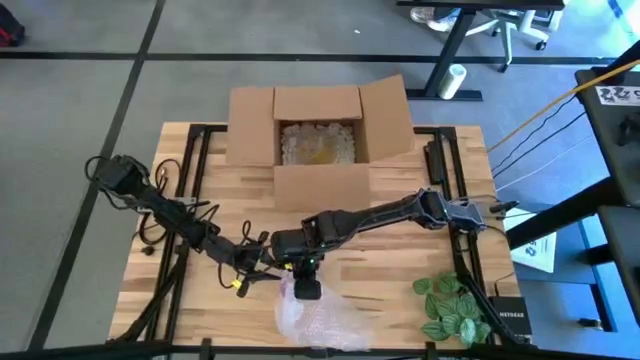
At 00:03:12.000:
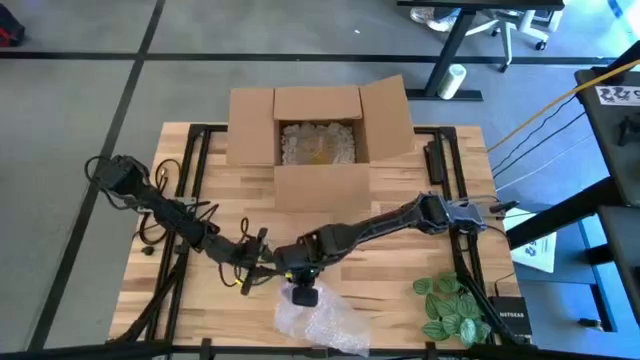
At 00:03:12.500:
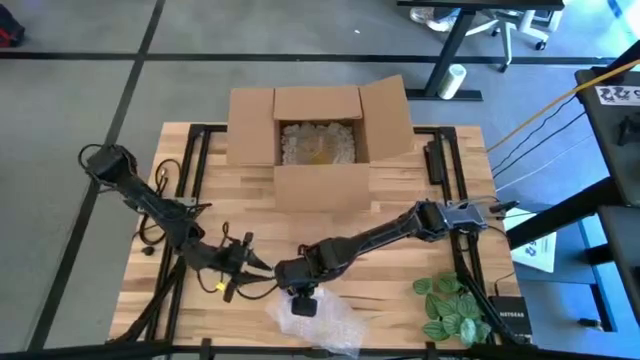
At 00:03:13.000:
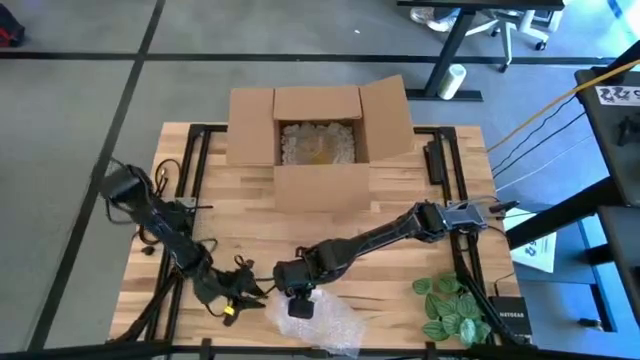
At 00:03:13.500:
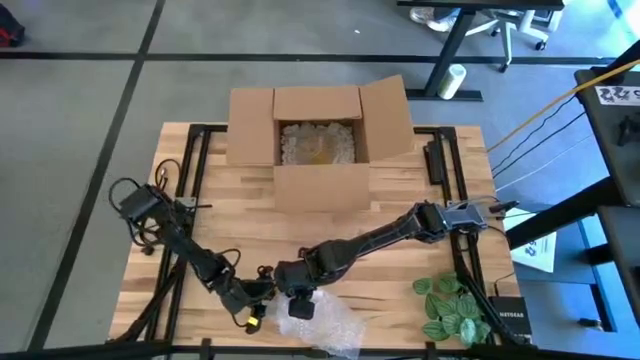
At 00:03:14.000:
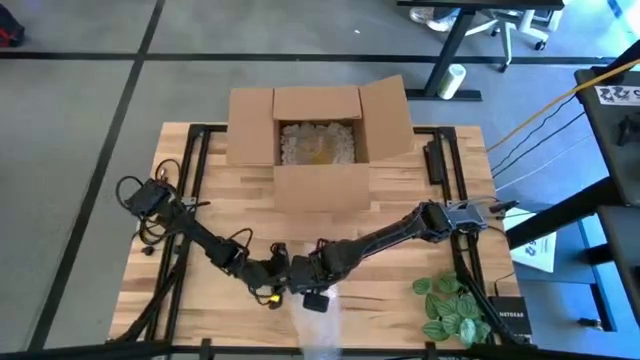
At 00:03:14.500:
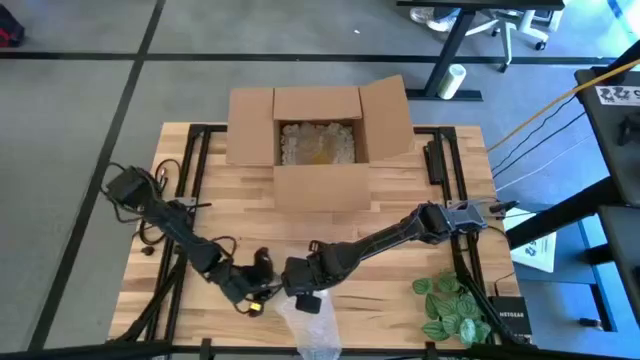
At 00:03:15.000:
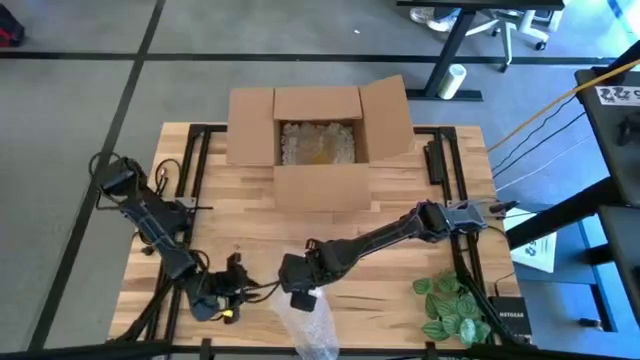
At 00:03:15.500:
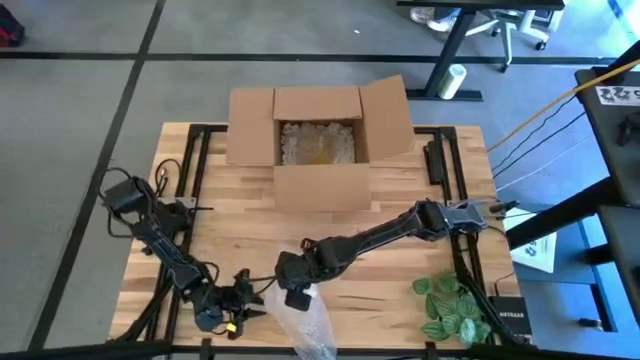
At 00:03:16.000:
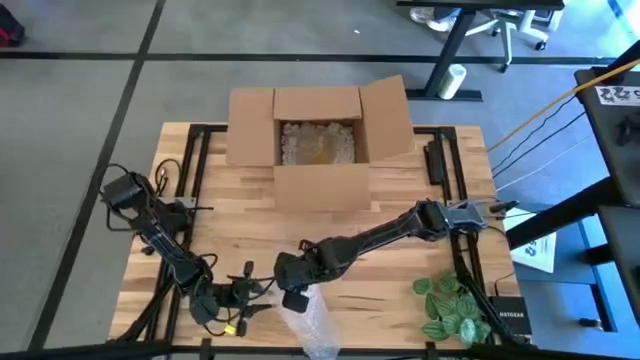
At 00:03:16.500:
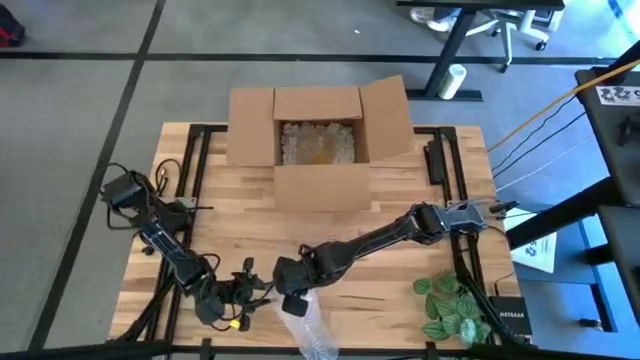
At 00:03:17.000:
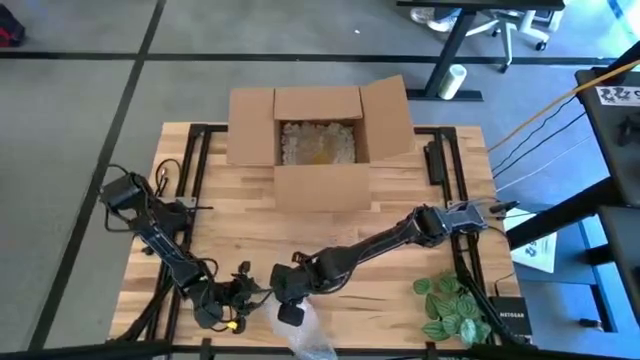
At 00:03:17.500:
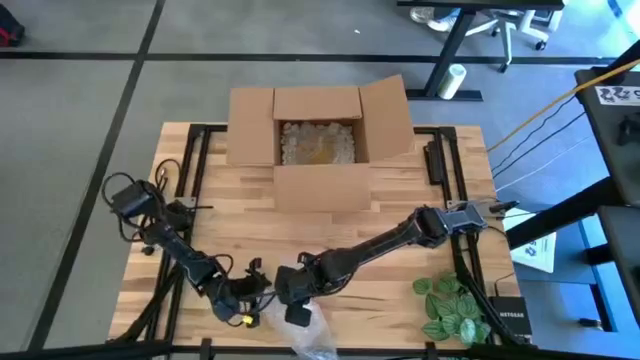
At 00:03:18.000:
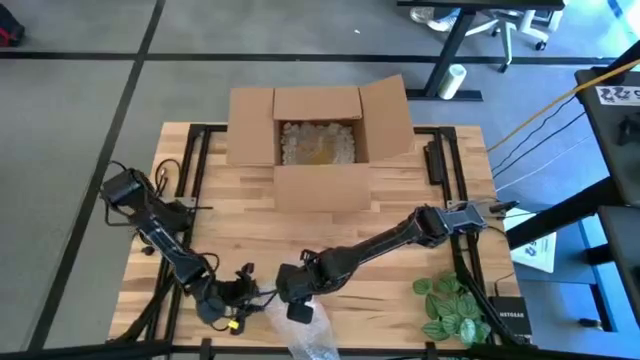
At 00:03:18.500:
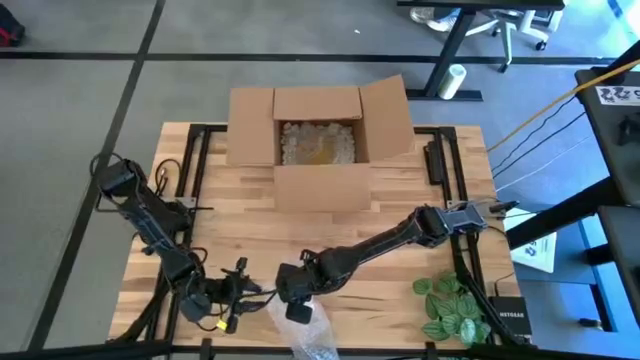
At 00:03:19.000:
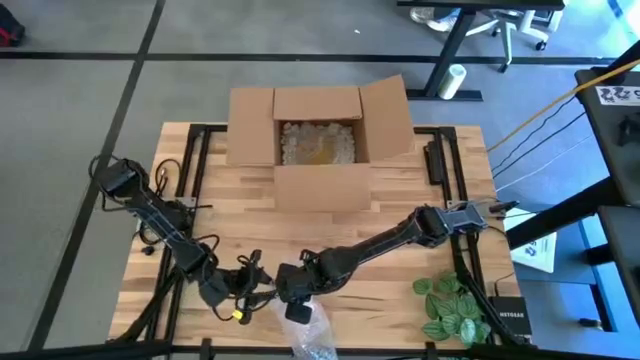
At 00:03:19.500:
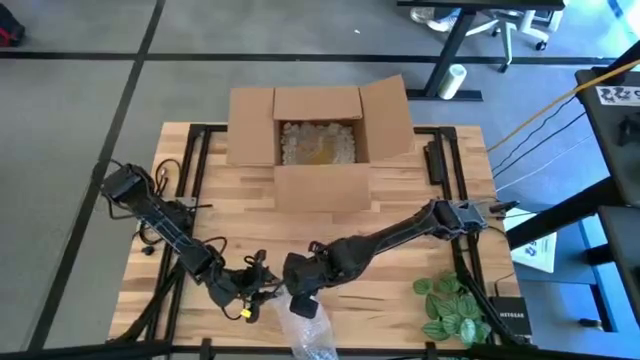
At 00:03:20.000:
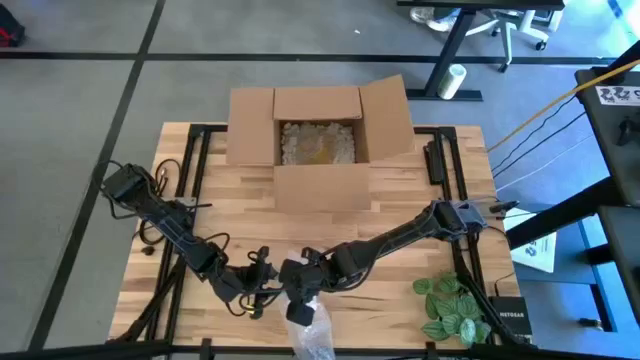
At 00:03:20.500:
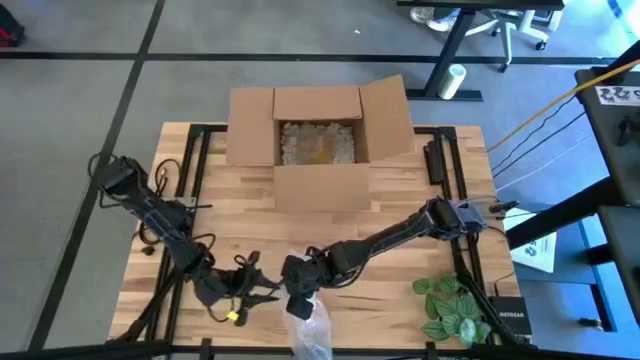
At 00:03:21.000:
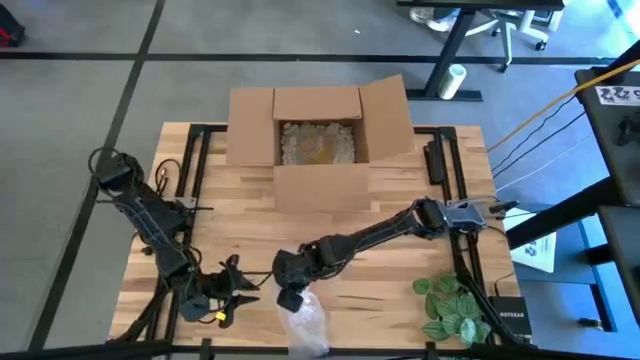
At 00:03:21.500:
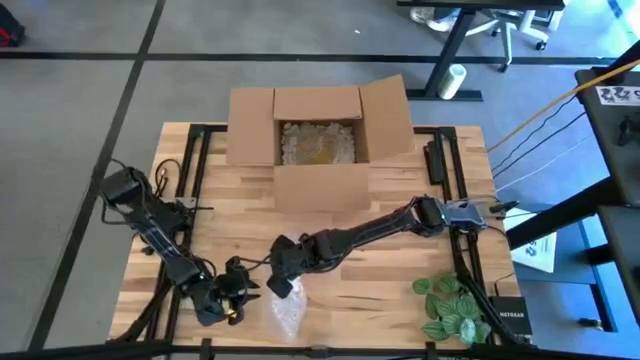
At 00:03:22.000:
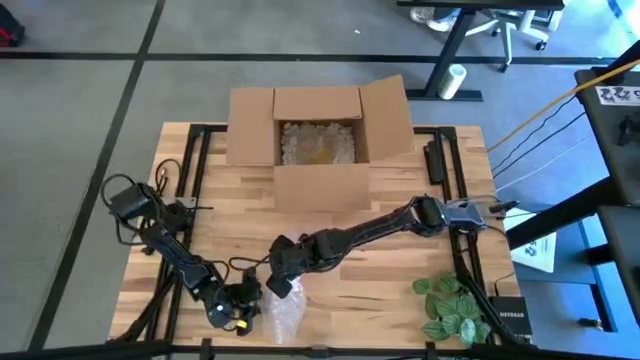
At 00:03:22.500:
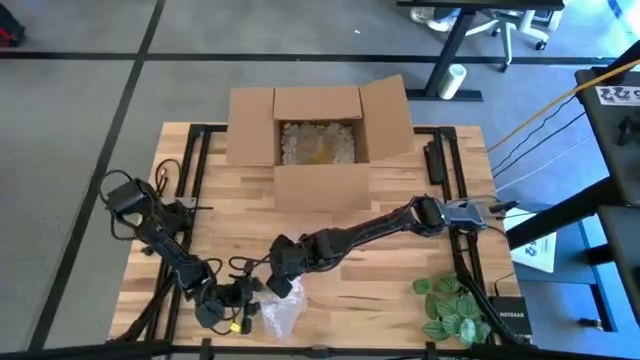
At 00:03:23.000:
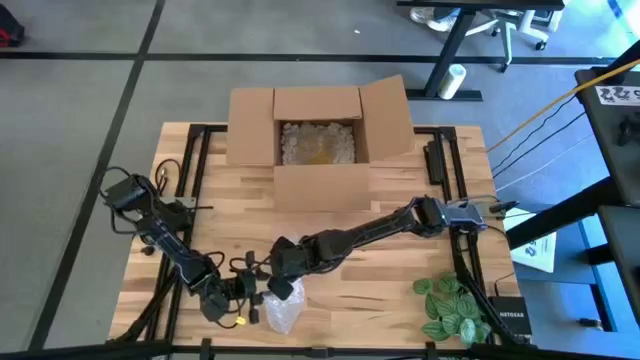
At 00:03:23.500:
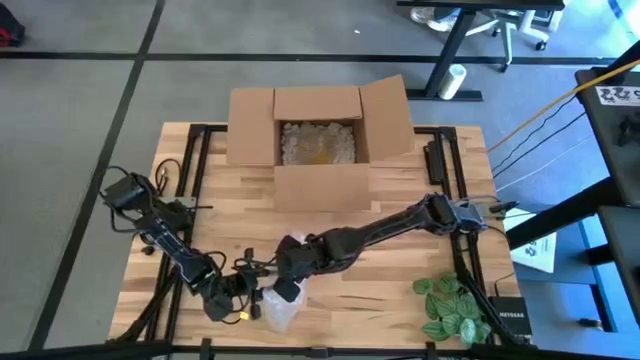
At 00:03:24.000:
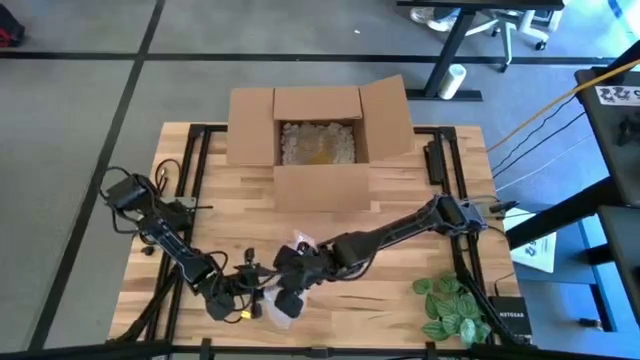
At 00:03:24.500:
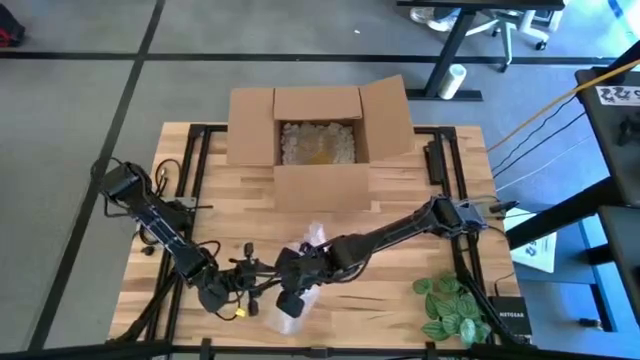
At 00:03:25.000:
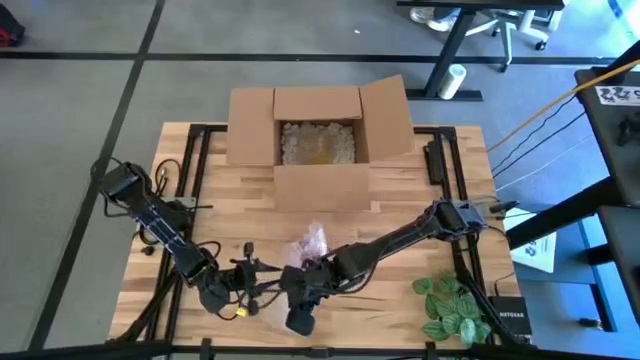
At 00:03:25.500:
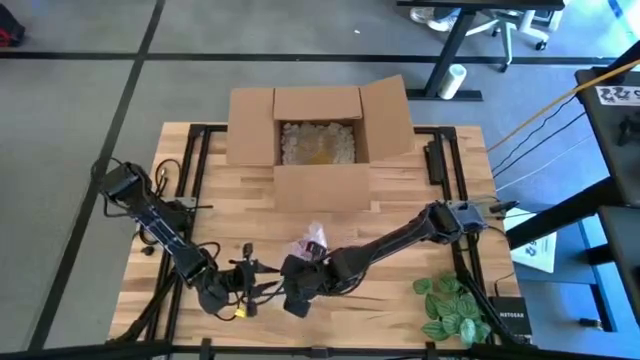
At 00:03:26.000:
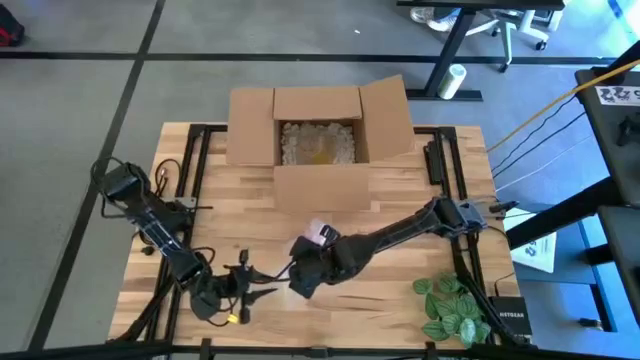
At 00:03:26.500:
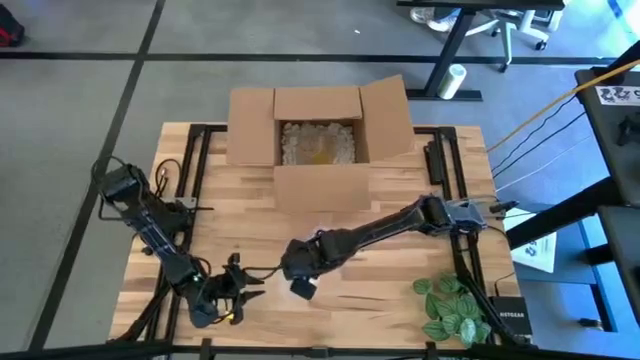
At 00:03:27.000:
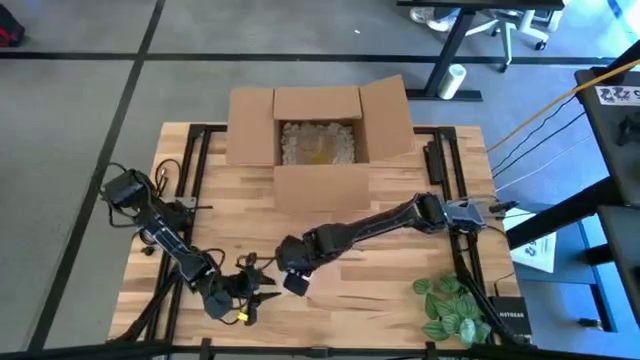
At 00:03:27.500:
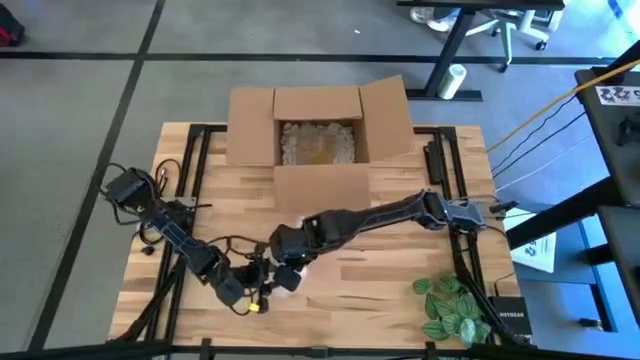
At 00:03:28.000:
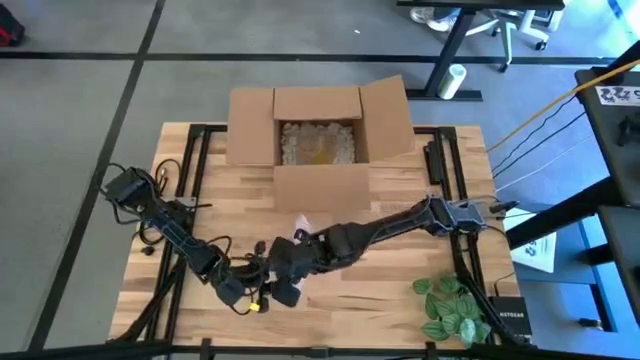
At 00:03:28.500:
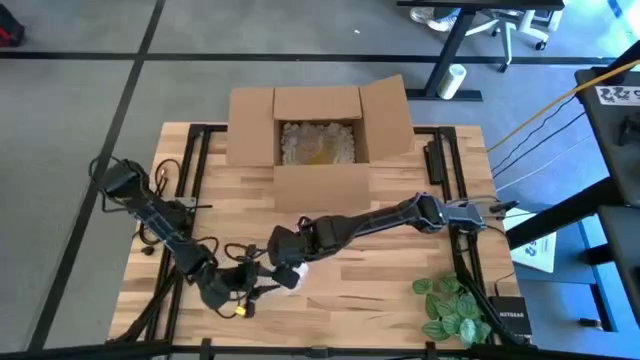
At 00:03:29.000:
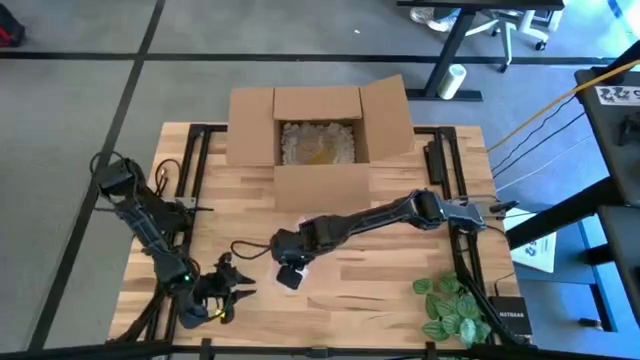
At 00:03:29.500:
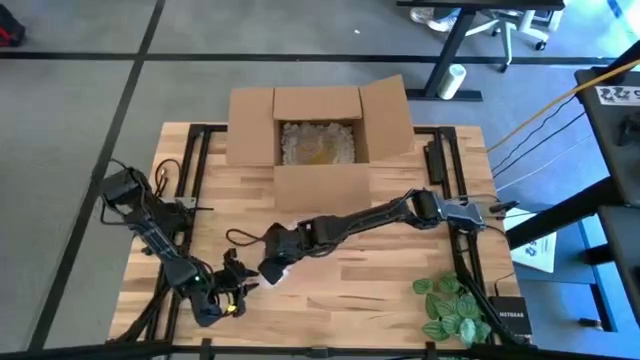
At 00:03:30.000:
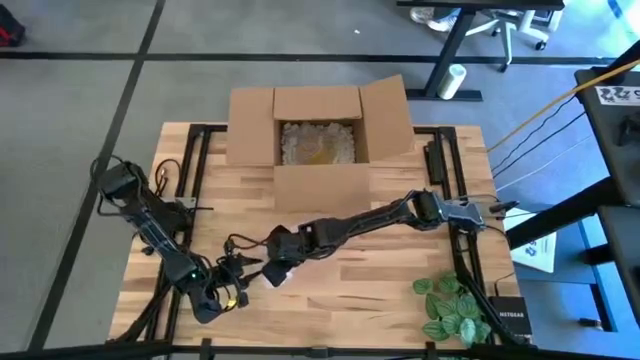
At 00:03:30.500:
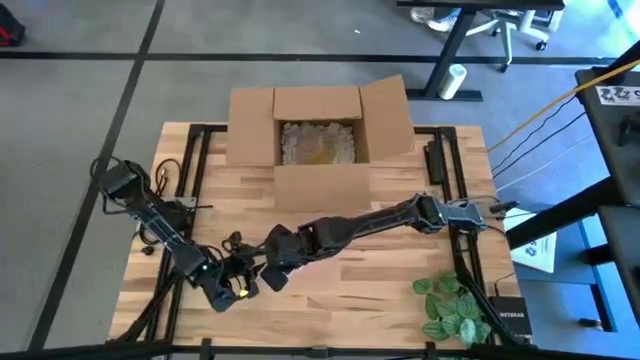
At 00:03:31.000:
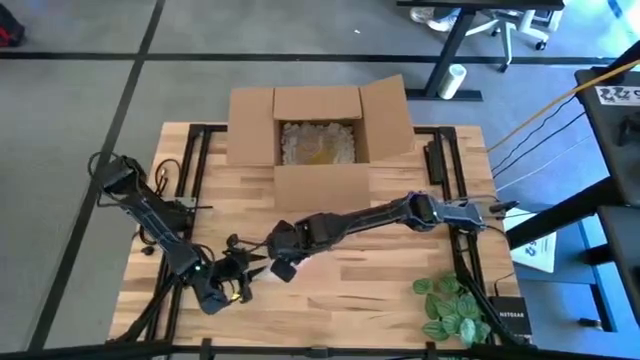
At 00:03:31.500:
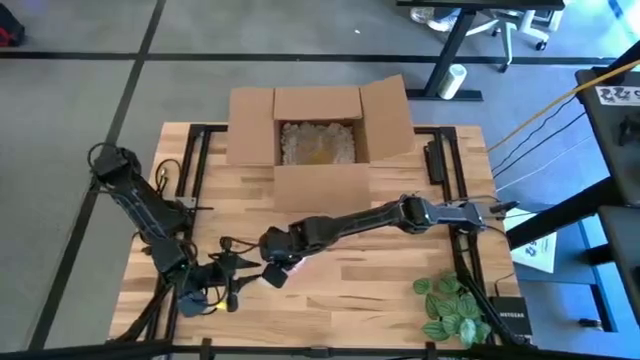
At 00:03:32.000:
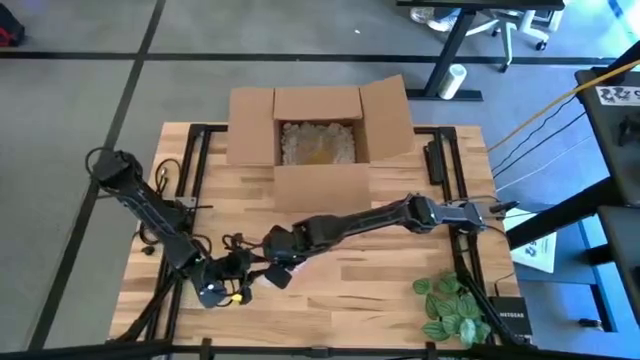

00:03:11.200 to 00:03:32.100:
Task: wrap mug
Wrap the red mug using the bubble wrap
